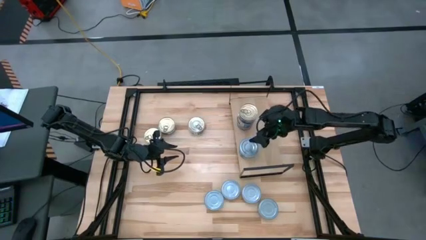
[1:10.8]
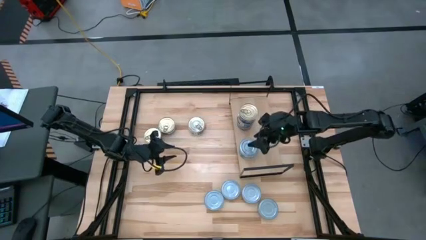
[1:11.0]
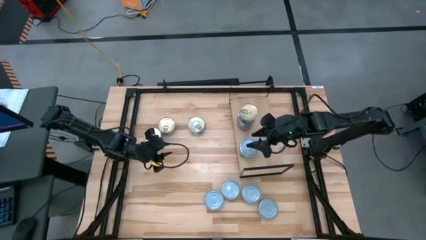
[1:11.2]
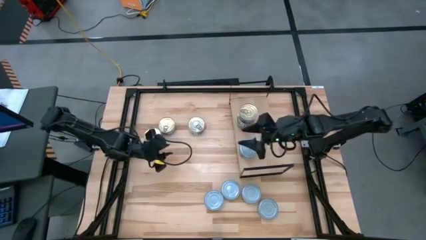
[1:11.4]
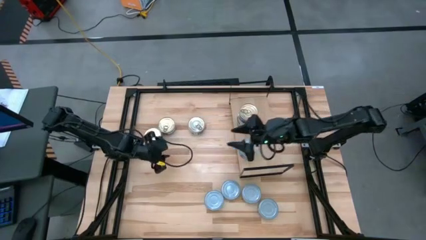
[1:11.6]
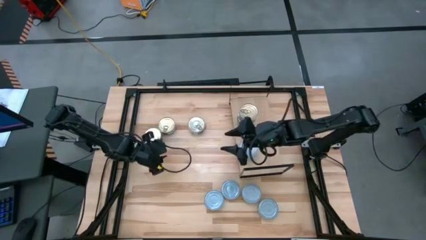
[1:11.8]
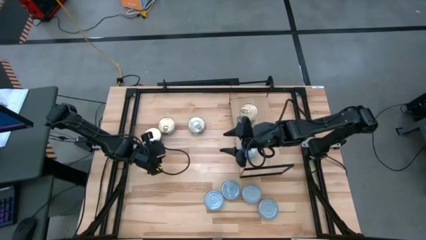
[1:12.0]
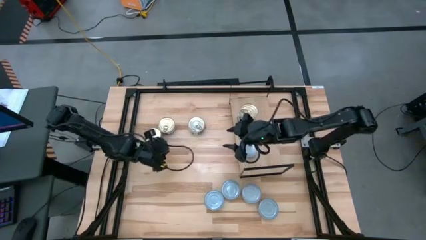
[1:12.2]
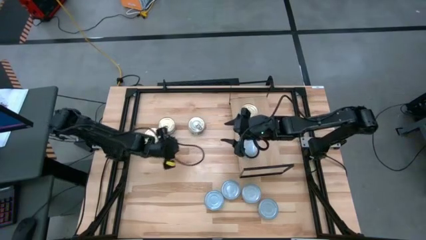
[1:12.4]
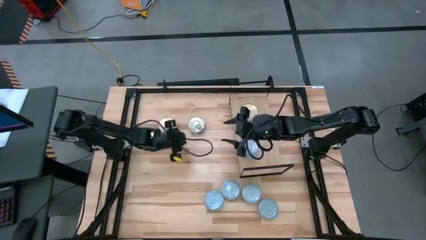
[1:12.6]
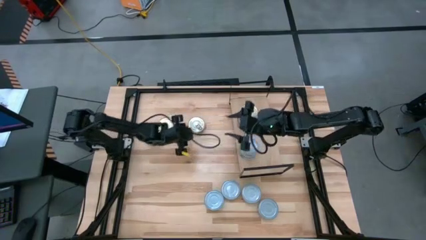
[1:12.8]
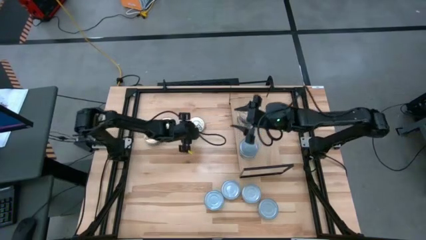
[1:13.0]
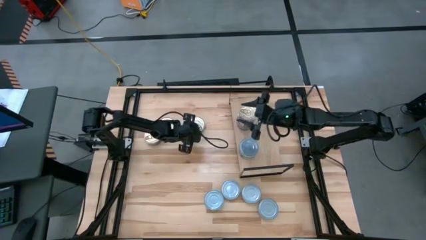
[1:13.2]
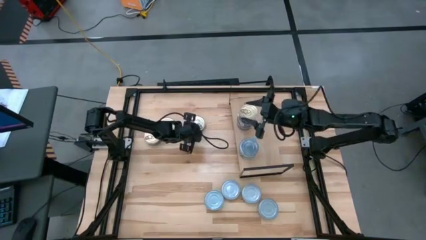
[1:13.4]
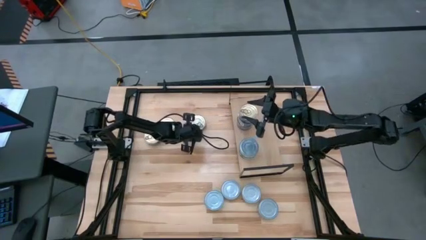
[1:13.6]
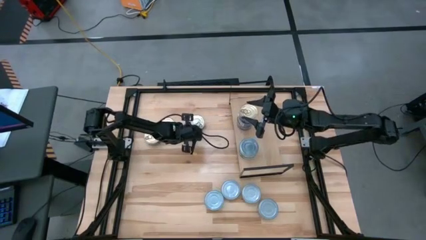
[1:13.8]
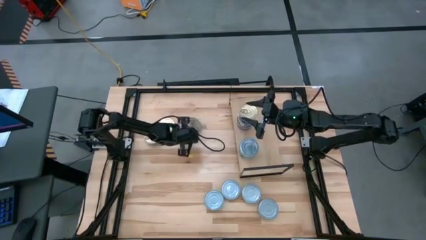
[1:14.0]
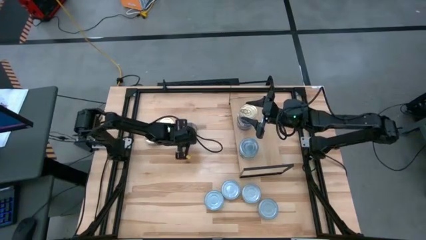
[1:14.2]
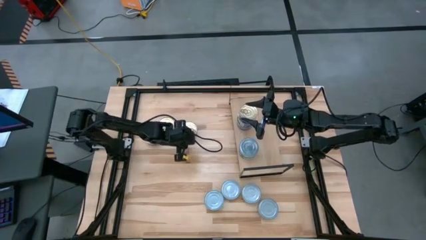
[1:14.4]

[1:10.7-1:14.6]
Task: Stack canned seafood by type on shelf
Stack the blue-pink tuna can on top of the other blue-pink tuna can on the shelf

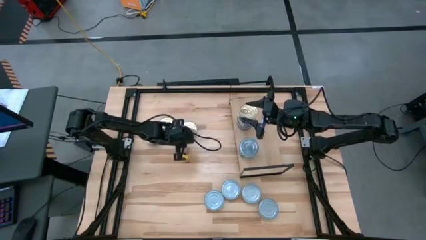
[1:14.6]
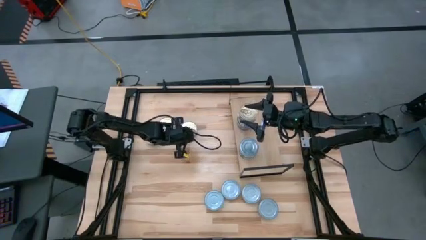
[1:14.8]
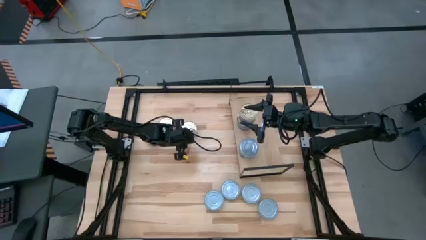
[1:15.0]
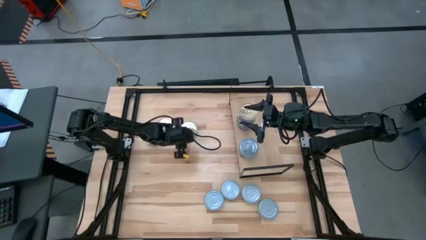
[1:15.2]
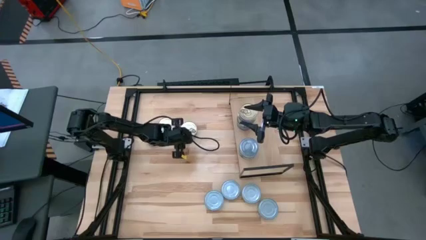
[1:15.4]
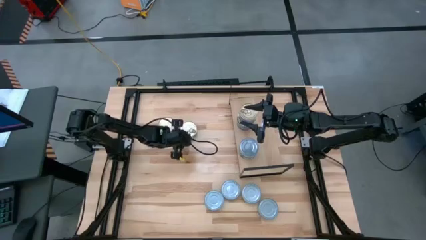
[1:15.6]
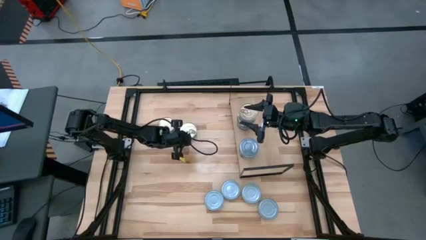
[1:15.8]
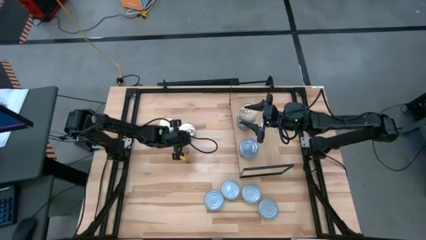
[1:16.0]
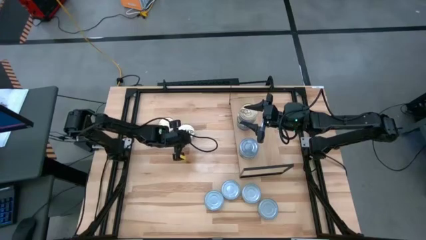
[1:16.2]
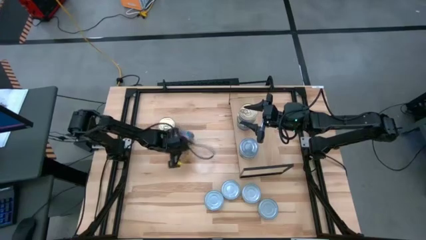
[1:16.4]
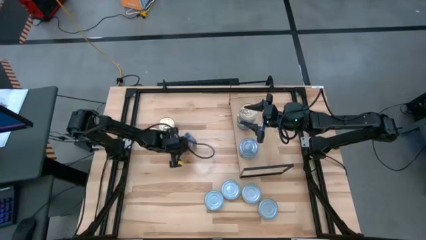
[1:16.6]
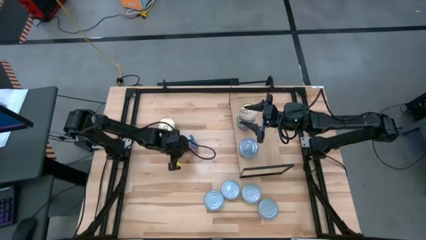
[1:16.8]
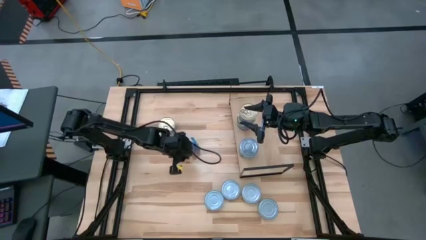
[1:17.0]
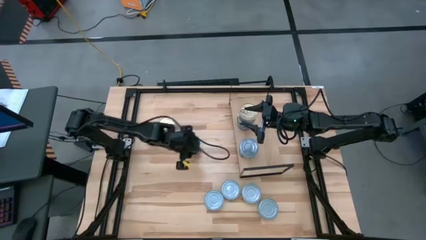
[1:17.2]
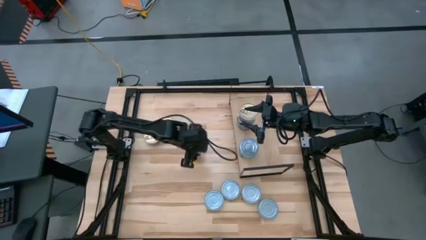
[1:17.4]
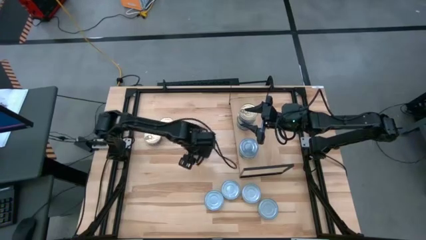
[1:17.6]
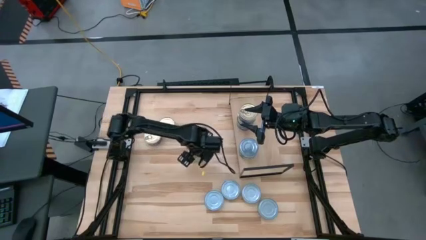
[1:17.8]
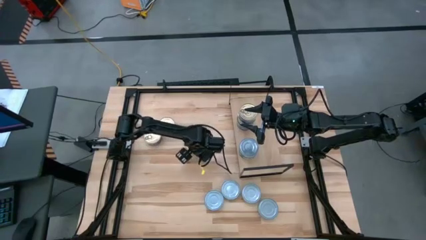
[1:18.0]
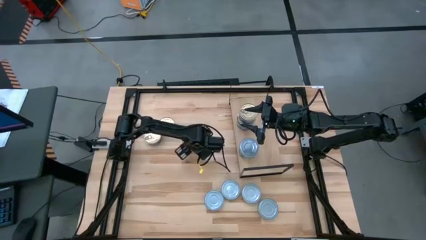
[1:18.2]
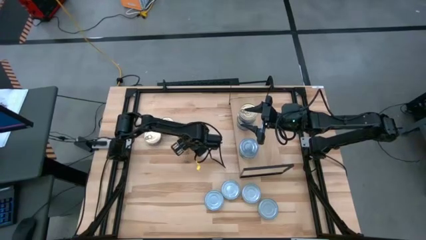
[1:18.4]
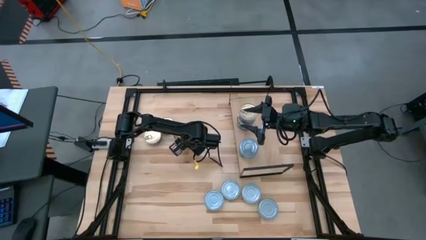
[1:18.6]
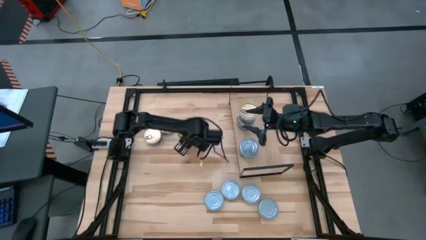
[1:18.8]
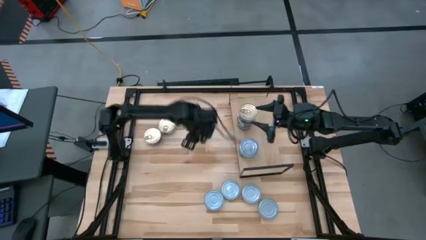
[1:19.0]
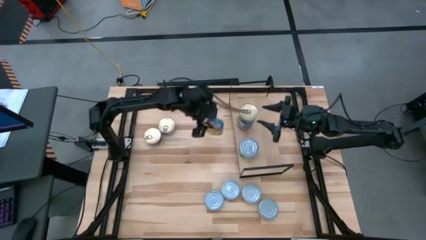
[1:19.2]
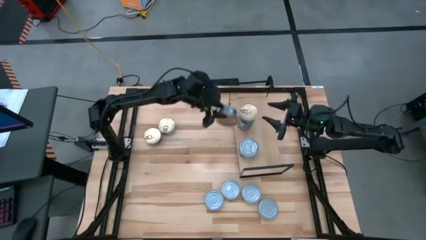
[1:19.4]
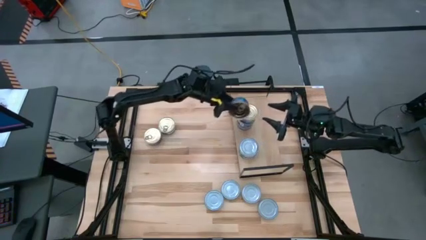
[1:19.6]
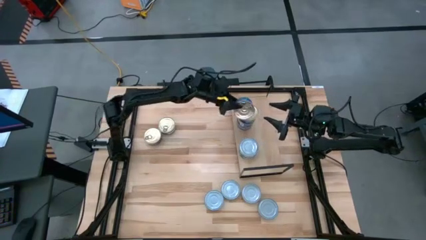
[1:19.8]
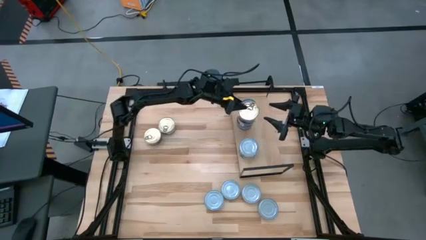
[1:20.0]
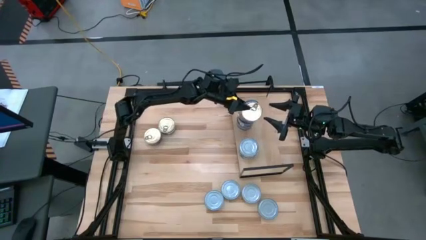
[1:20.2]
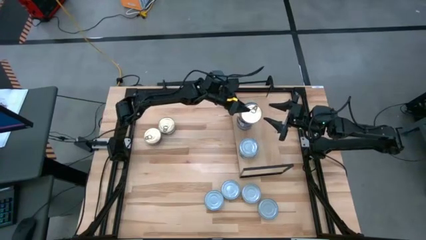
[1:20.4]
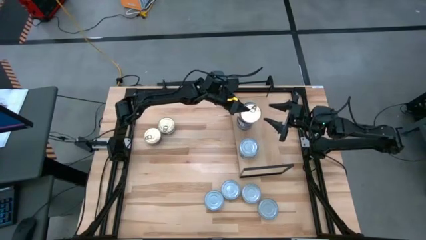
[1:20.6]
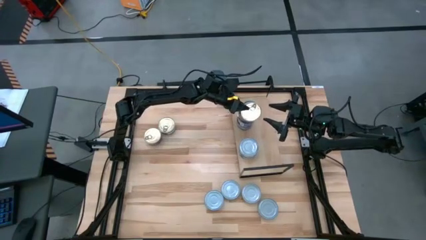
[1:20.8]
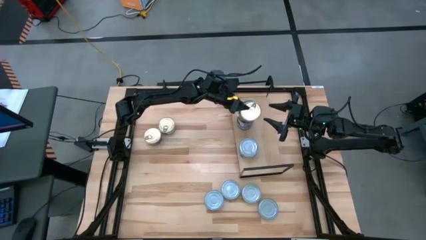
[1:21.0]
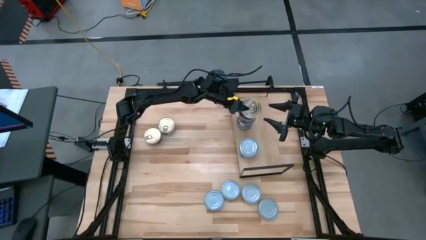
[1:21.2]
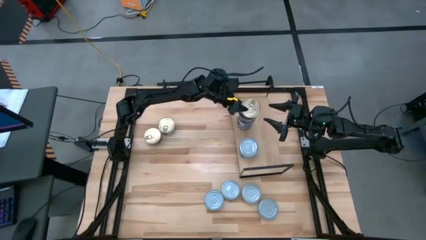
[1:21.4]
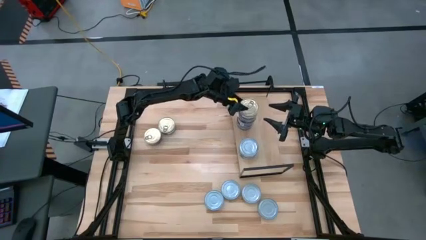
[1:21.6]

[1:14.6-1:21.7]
Stack the blue-pink tuna can on top of the other blue-pink tuna can on the shelf
